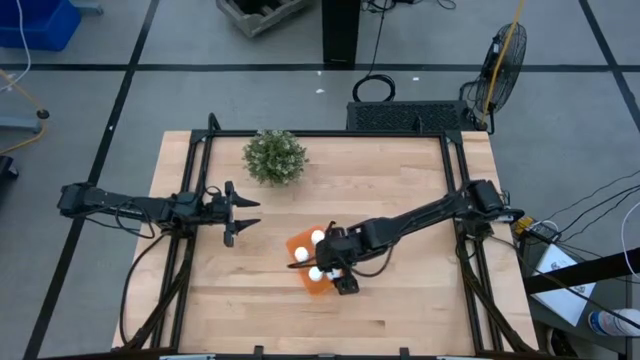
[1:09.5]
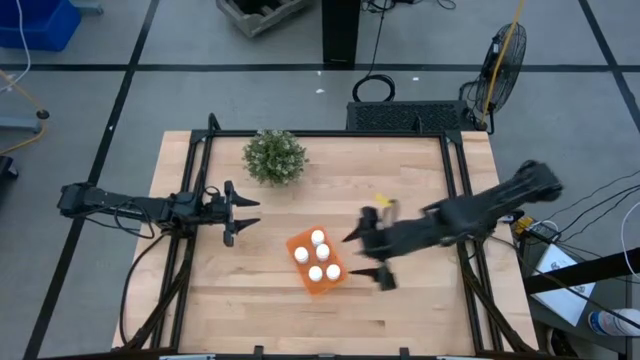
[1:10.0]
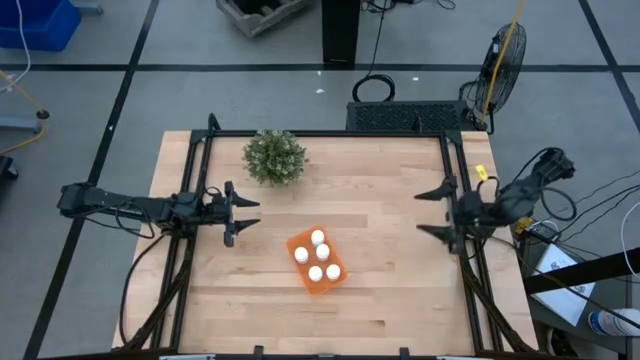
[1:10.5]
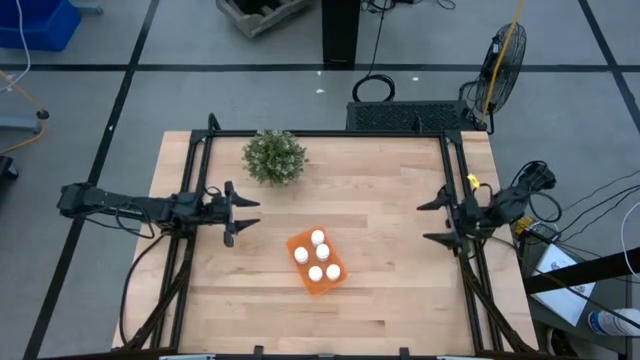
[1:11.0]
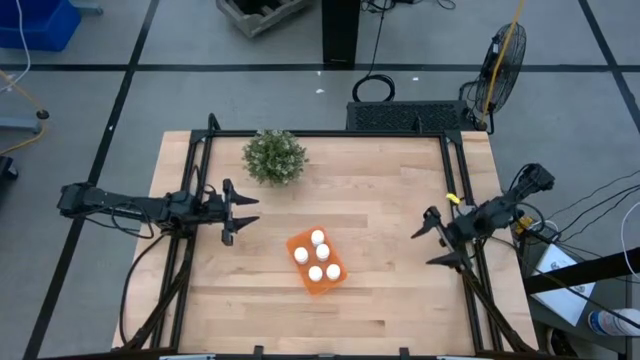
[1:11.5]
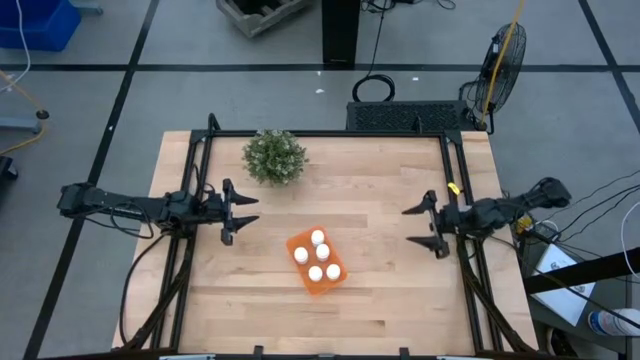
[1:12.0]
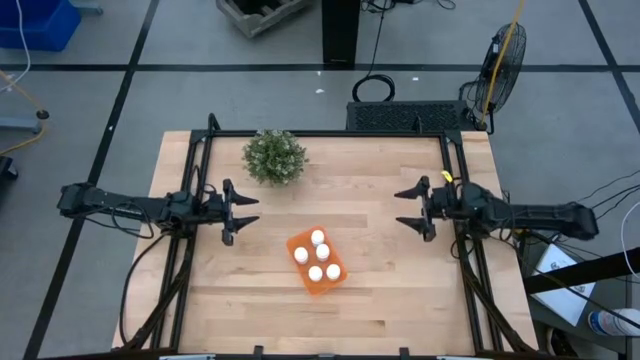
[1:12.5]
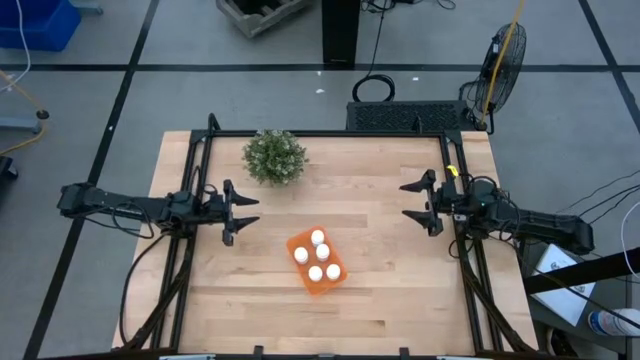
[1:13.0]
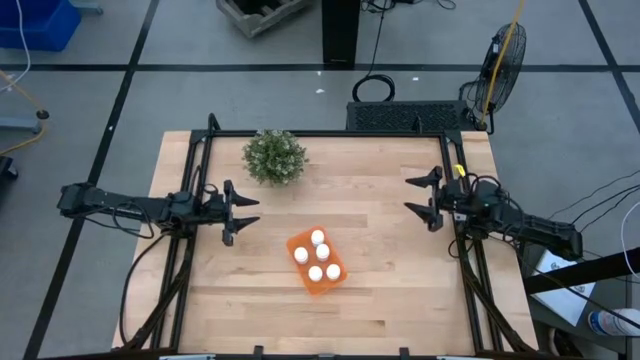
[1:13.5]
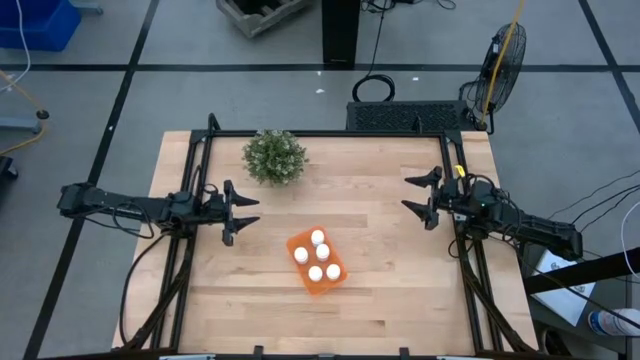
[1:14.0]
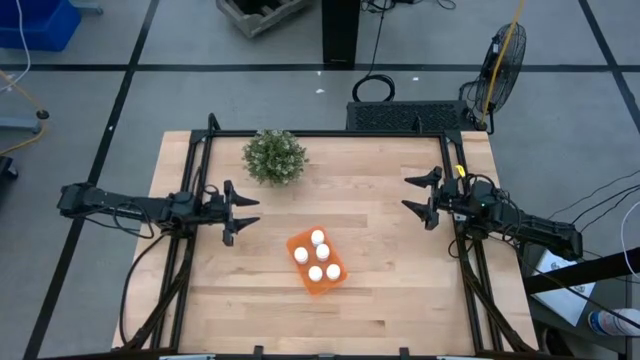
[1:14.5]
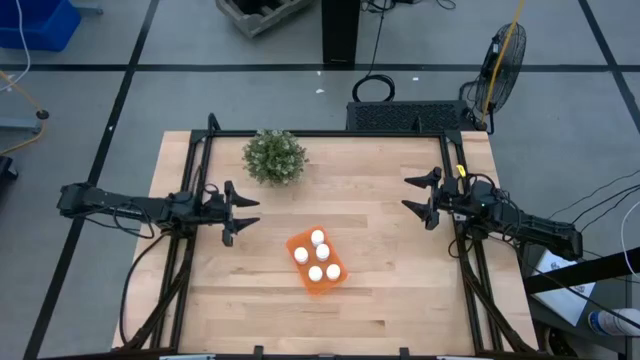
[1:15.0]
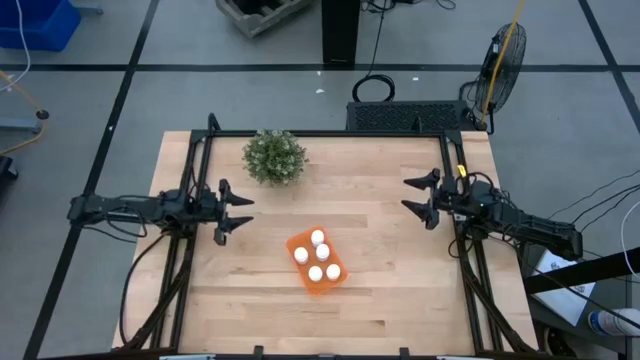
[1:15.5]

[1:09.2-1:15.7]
Task: Pick and place pill bottles into a basket
Return to Home Position

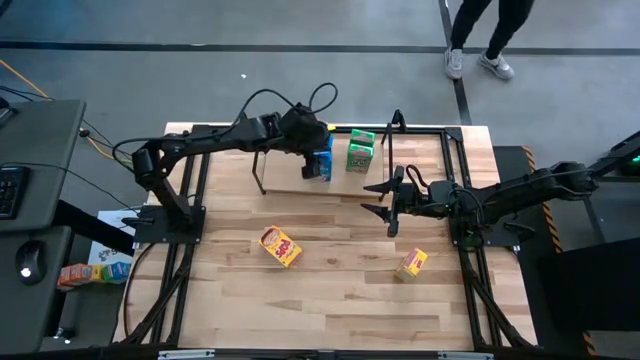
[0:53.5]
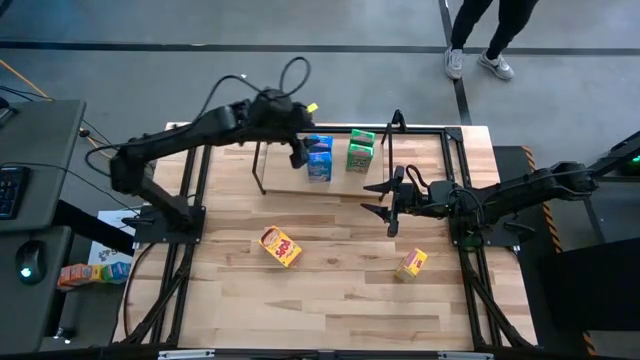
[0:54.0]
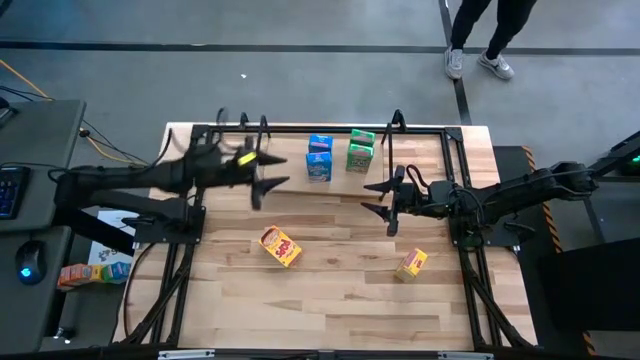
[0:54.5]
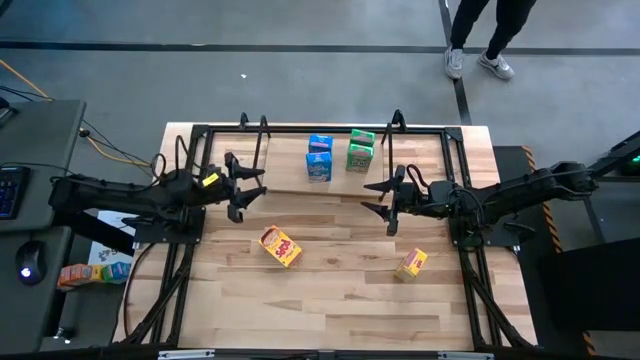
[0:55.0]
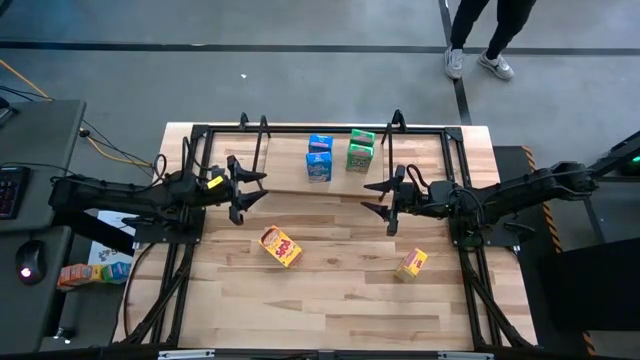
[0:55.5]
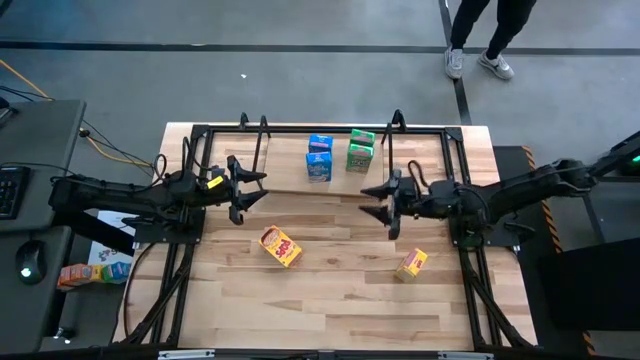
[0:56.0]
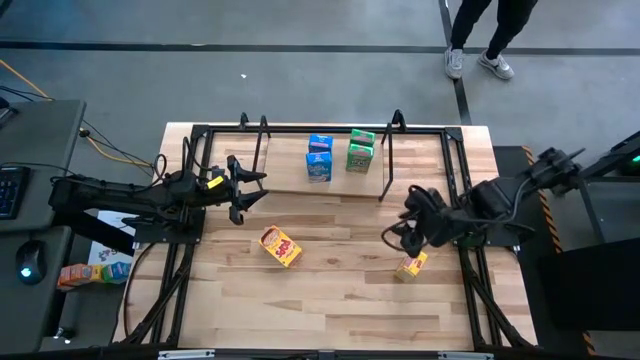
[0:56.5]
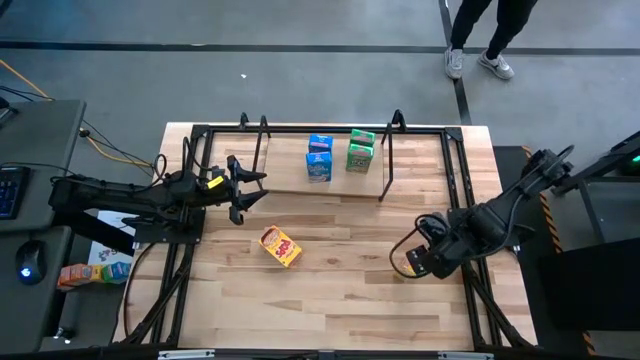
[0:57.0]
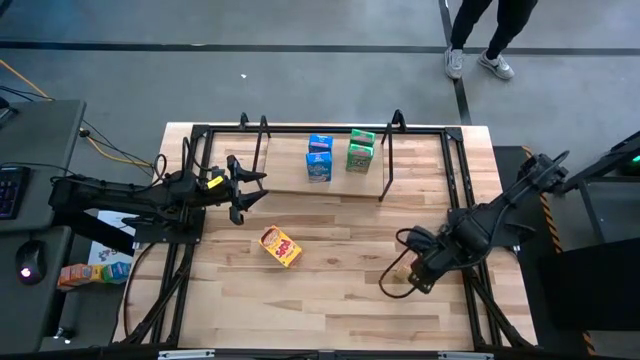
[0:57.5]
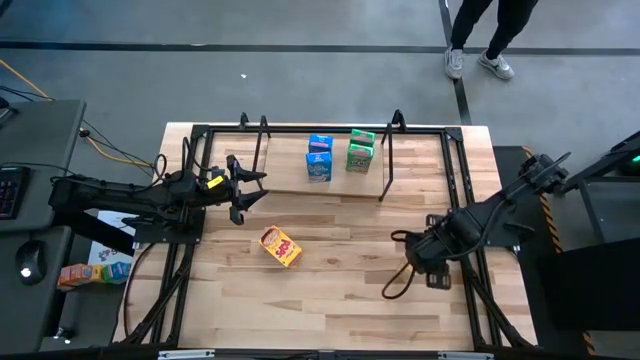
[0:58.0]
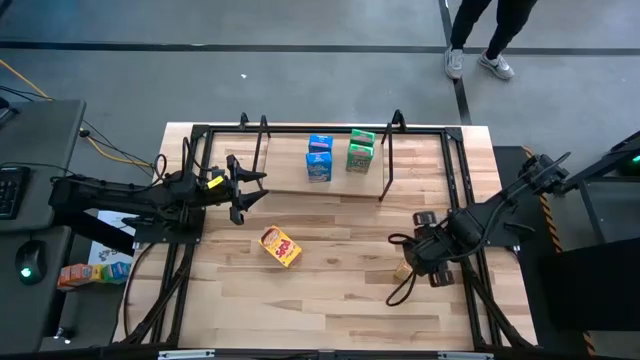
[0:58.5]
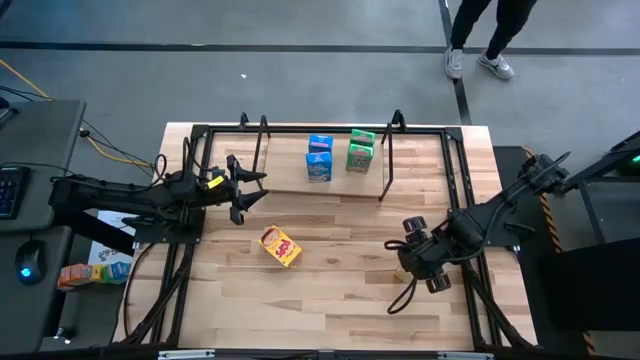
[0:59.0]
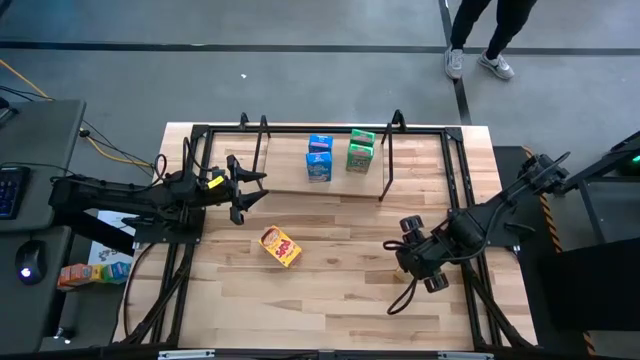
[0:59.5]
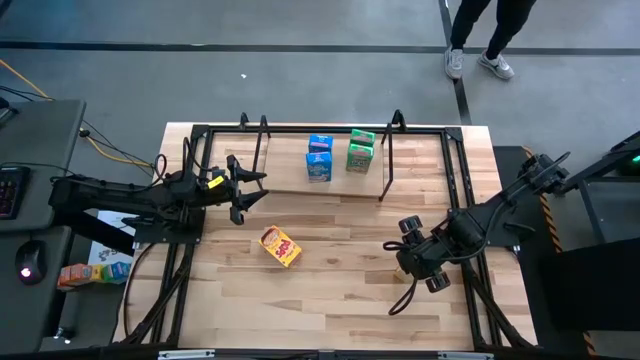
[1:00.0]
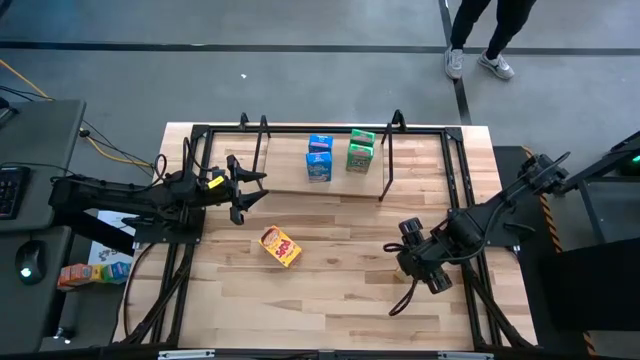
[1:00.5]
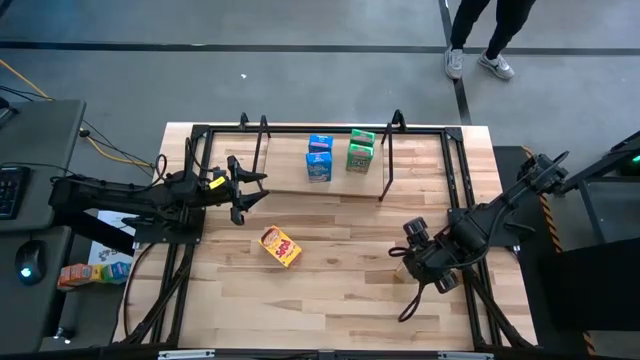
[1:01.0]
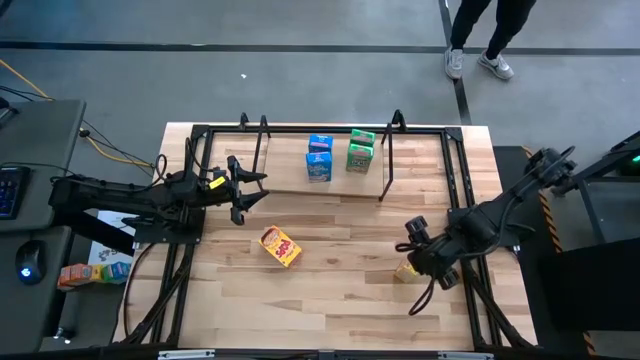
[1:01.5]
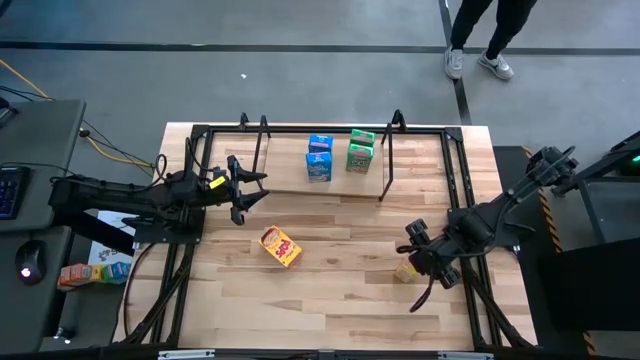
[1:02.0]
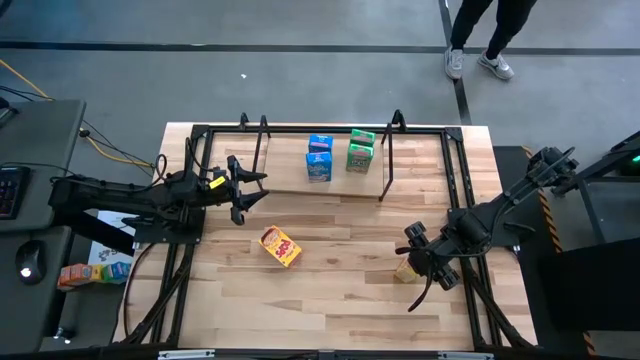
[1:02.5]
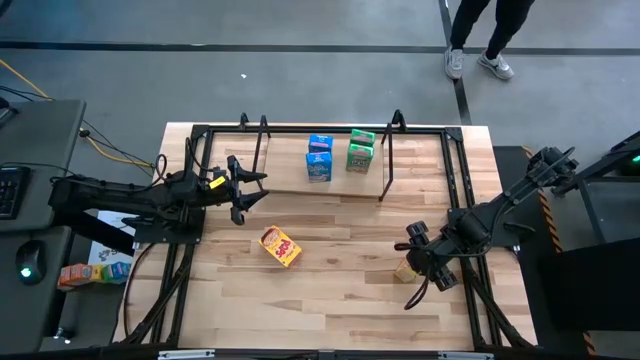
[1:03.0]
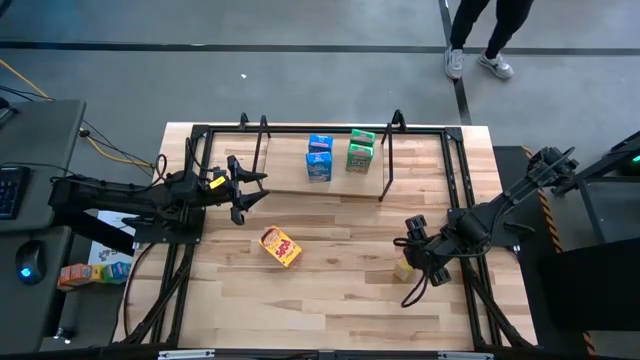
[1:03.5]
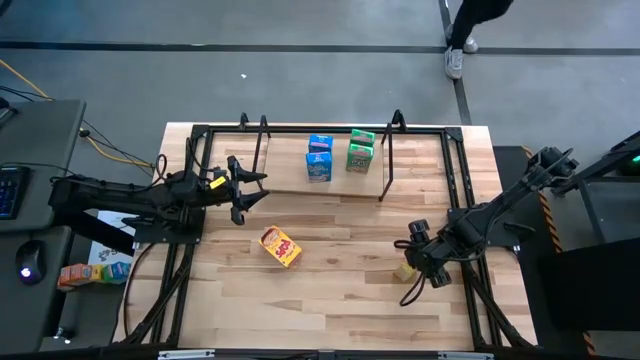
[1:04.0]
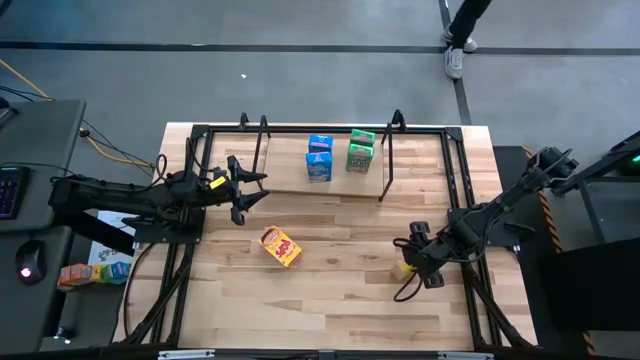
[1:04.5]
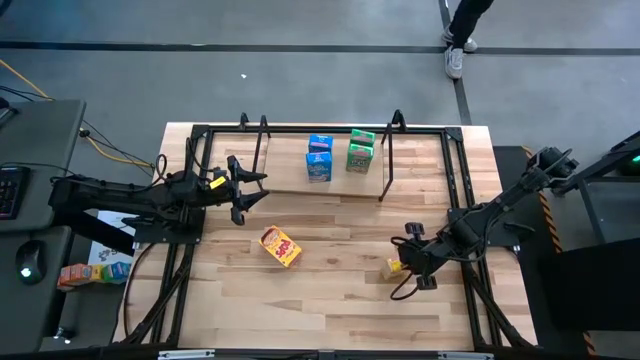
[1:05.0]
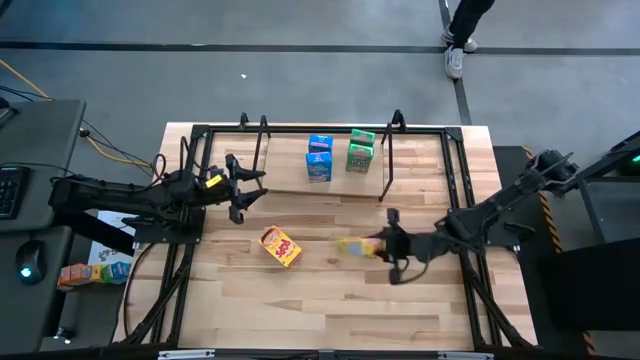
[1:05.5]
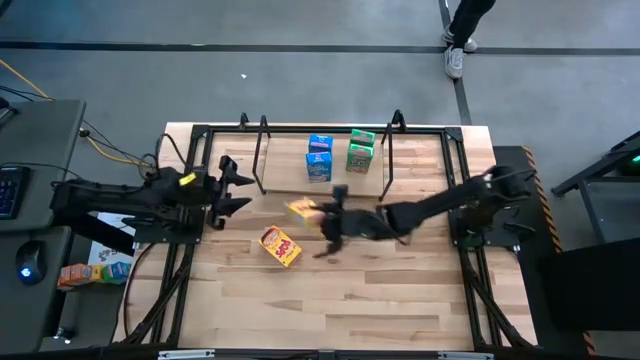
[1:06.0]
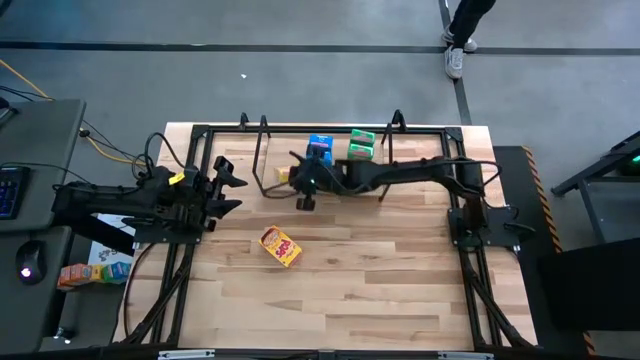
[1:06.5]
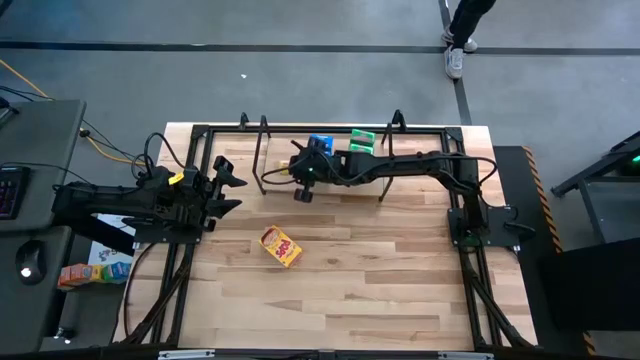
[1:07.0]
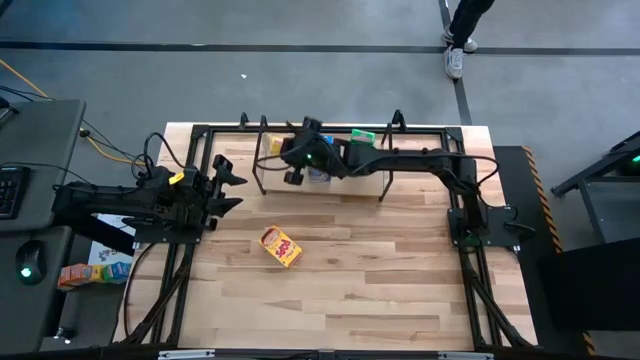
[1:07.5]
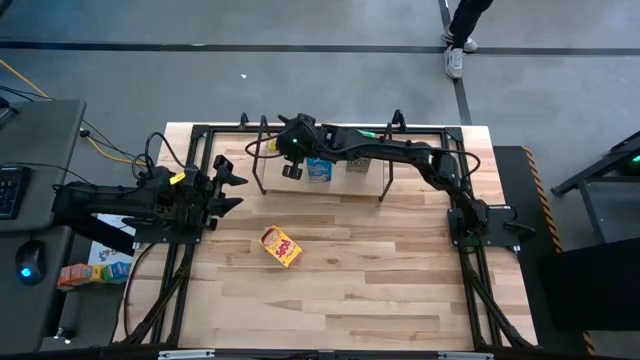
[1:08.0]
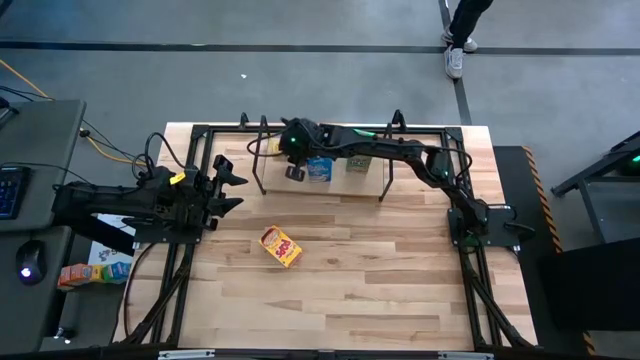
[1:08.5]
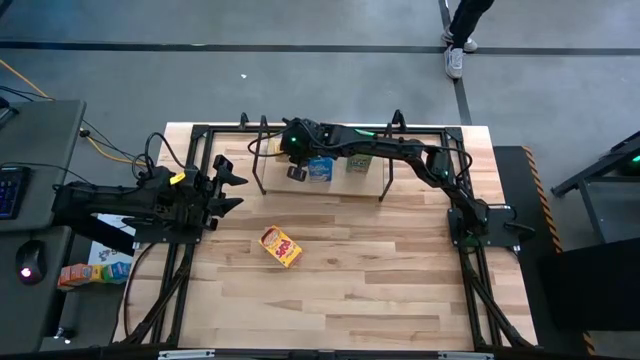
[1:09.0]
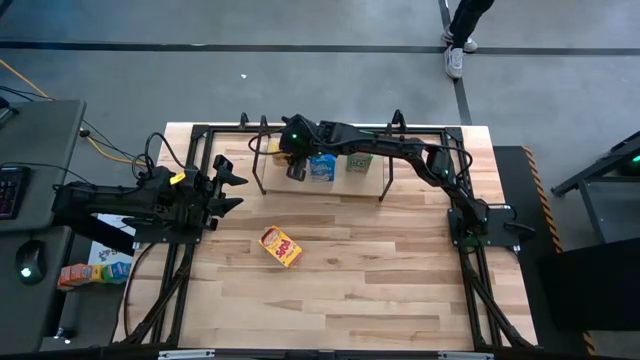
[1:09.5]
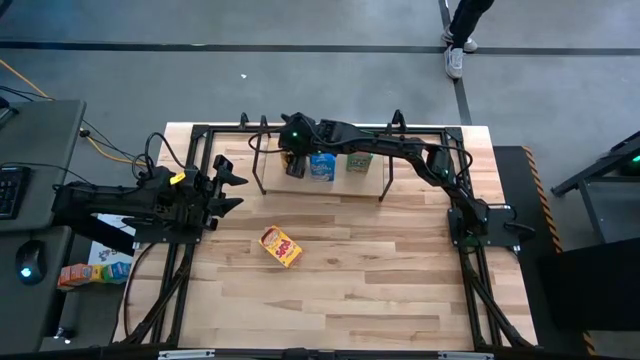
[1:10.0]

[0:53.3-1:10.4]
Task: Stack cereal on shelf
Put the right yellow cereal box on the shelf
